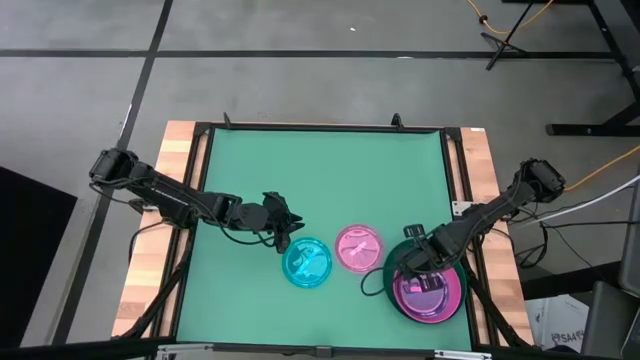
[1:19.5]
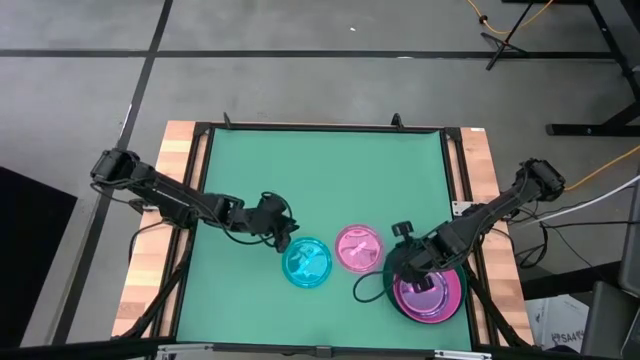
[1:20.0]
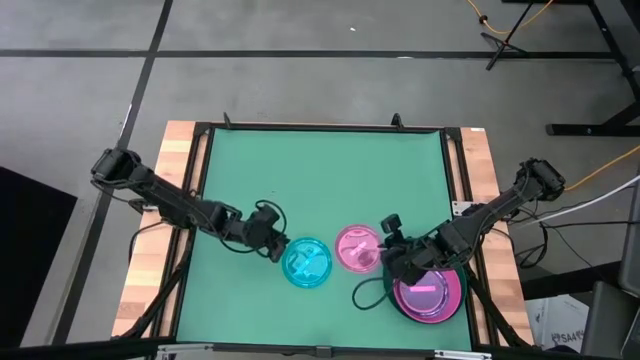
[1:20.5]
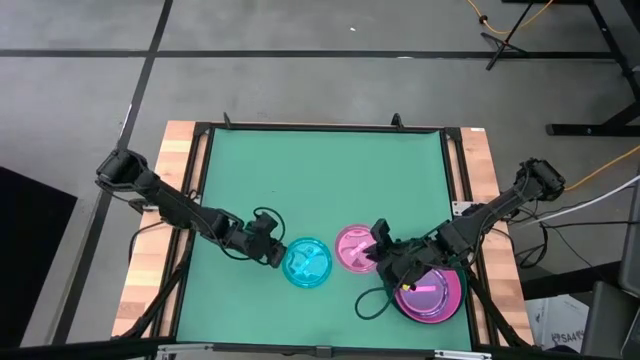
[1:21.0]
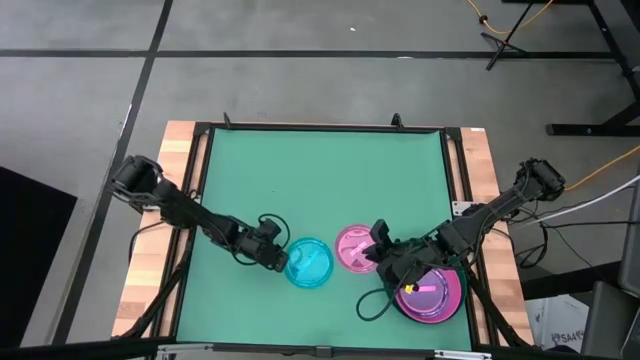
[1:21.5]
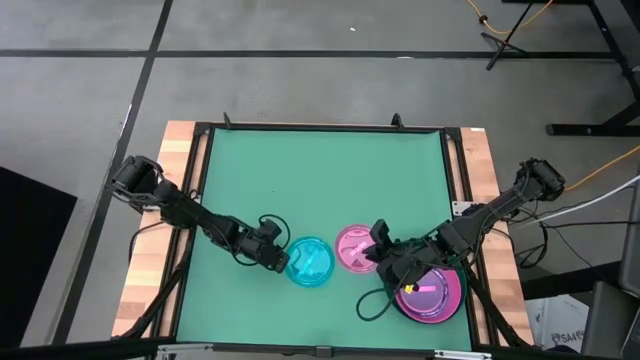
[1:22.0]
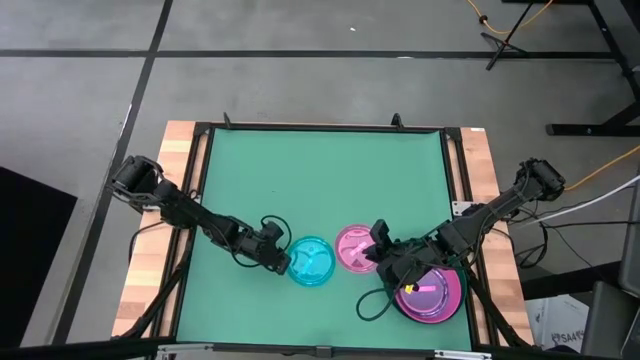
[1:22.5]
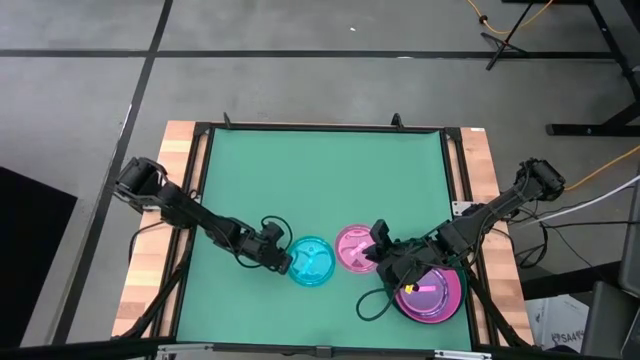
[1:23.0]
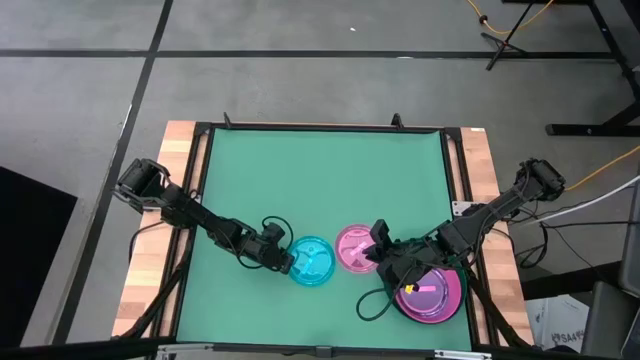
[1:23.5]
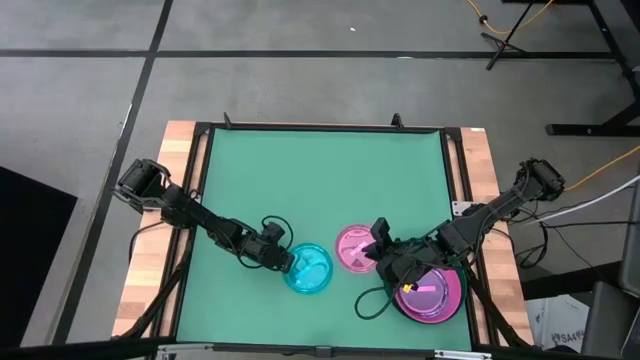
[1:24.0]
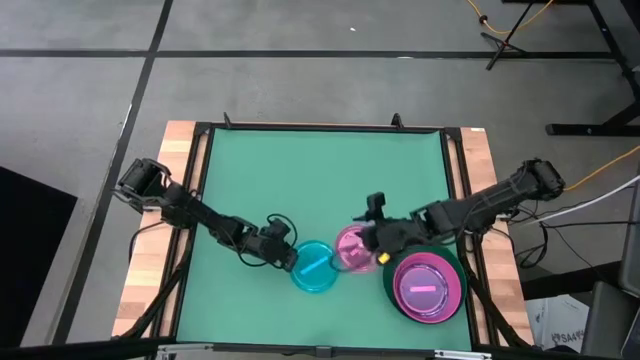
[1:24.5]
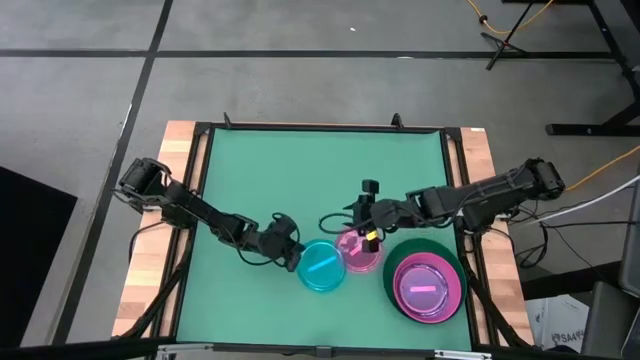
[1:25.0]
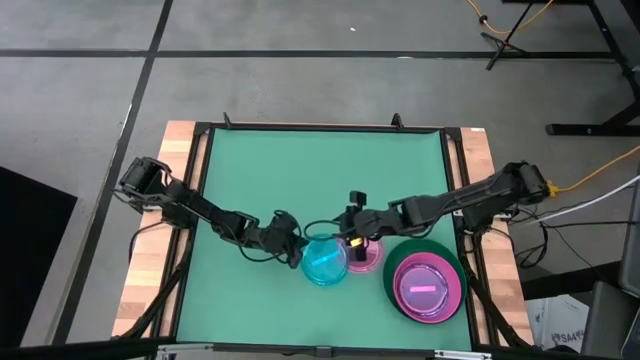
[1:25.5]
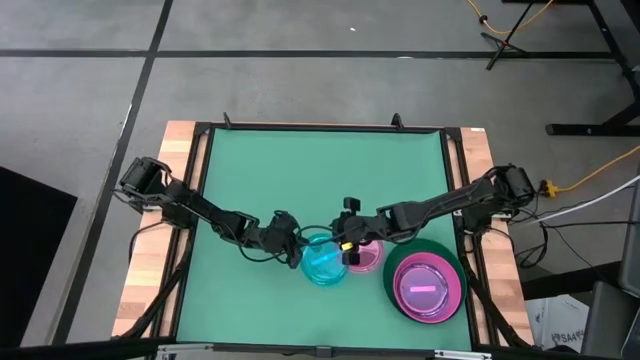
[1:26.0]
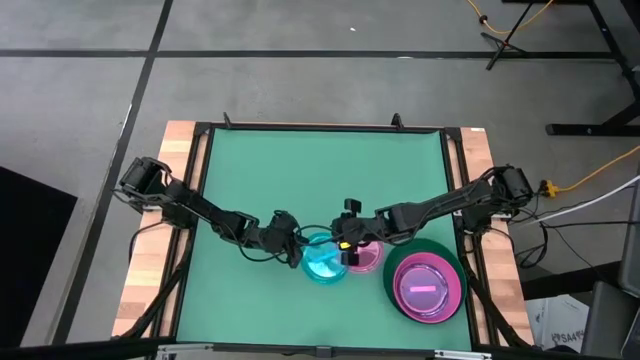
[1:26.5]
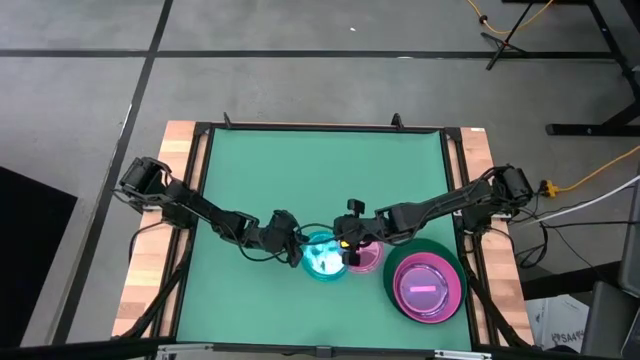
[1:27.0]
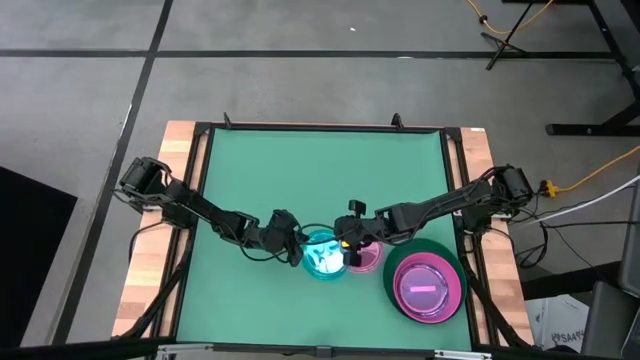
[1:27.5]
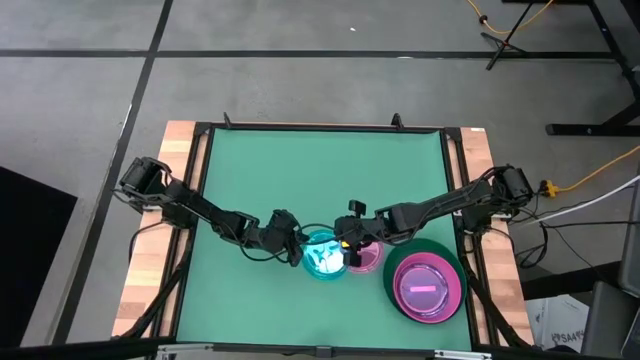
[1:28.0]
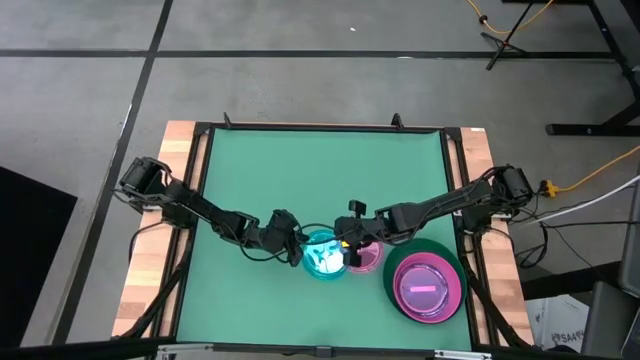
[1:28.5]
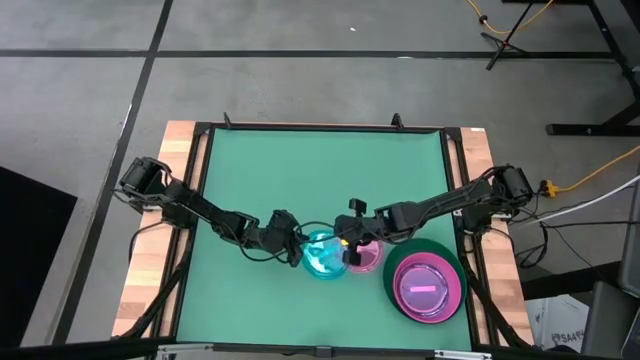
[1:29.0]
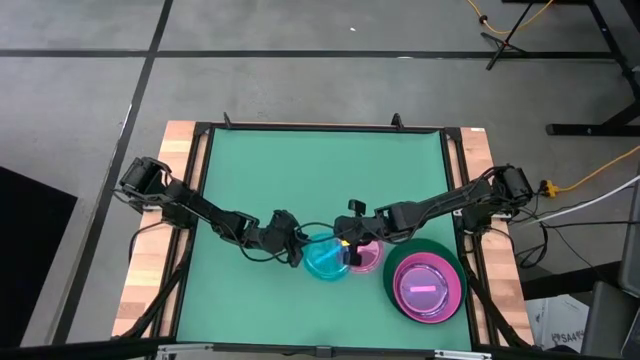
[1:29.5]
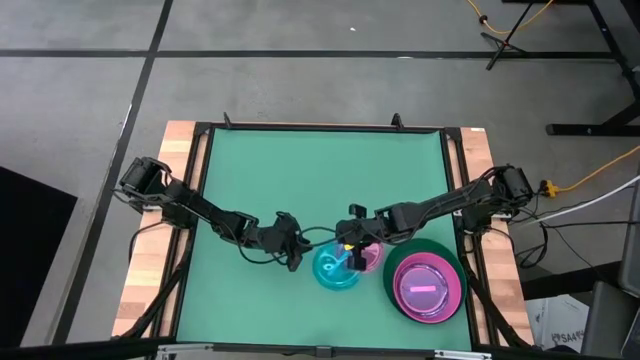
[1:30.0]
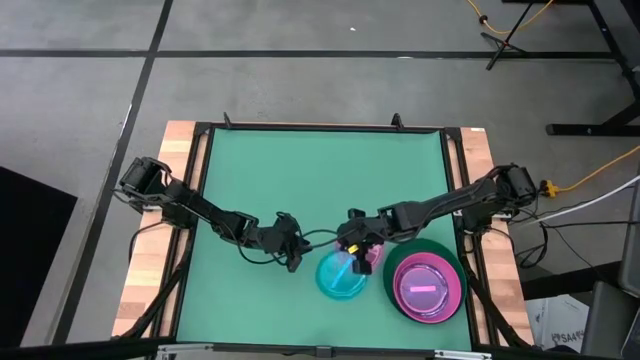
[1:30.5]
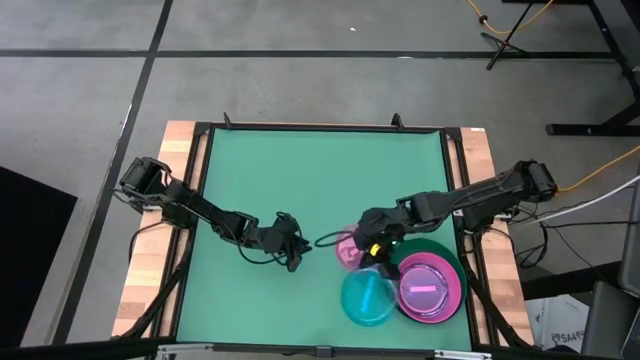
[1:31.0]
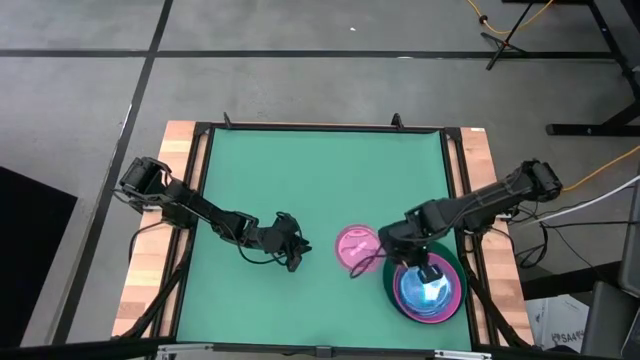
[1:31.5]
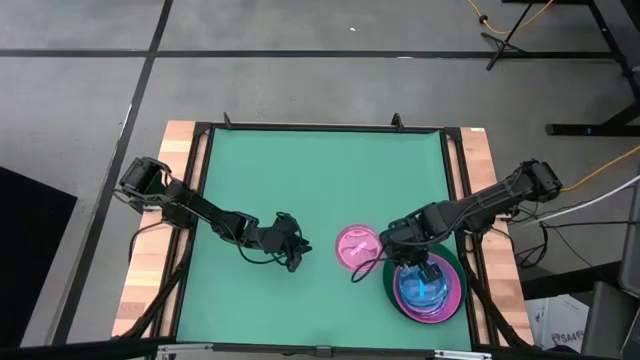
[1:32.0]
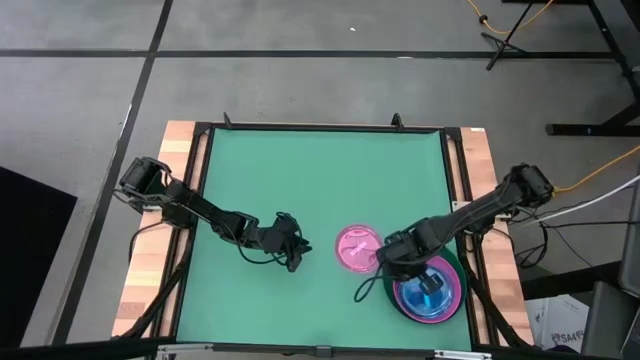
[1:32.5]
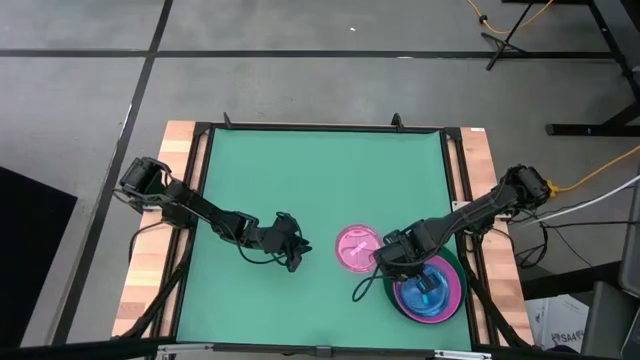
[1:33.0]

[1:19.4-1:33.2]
Task: Stack plastic plates
Stack the transparent blue plate on top of the transparent pink plate

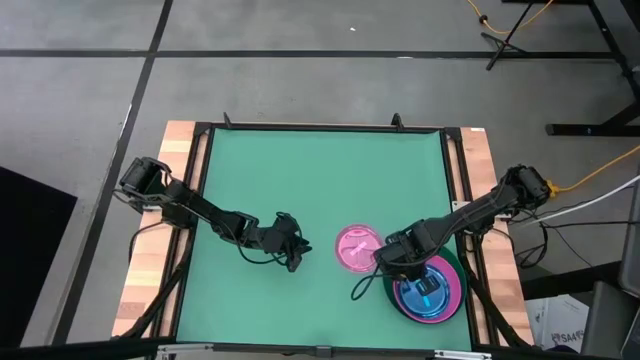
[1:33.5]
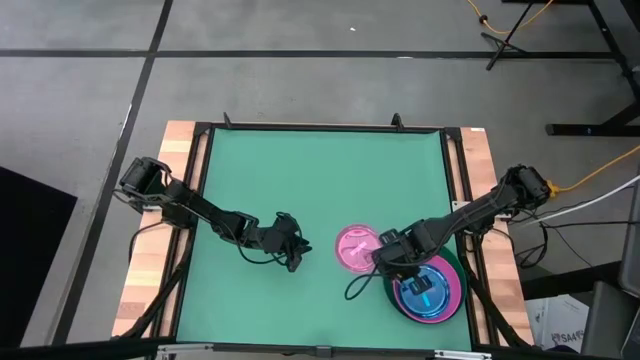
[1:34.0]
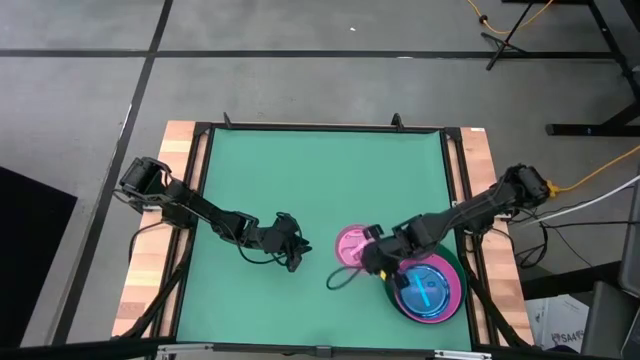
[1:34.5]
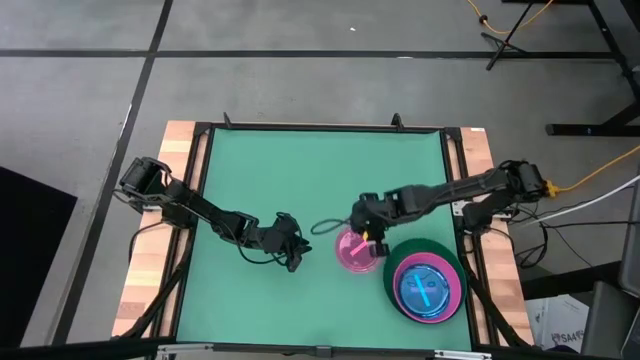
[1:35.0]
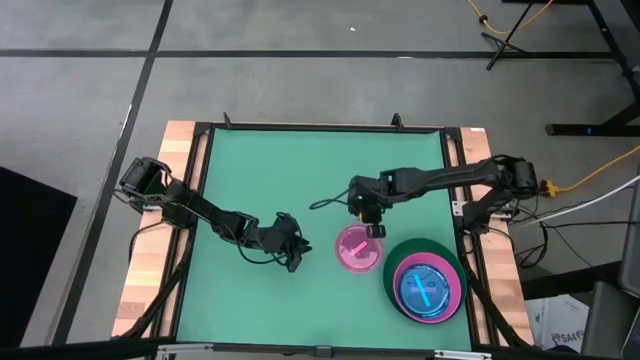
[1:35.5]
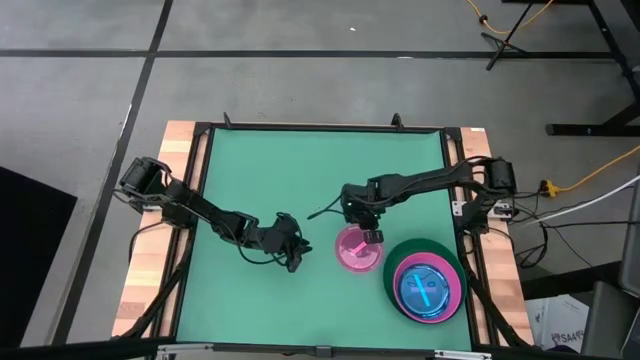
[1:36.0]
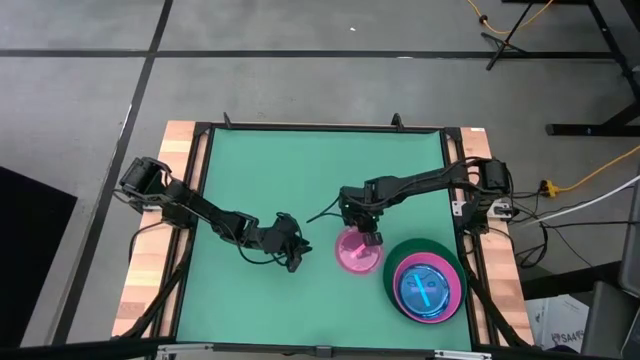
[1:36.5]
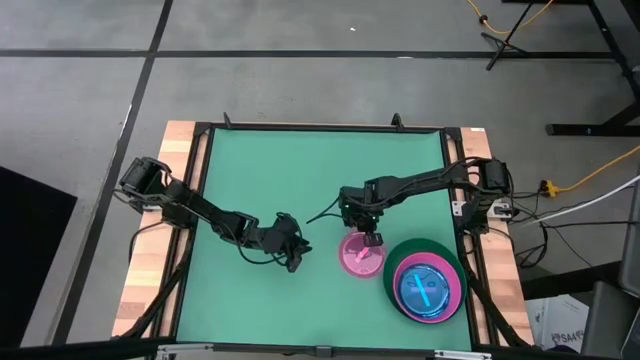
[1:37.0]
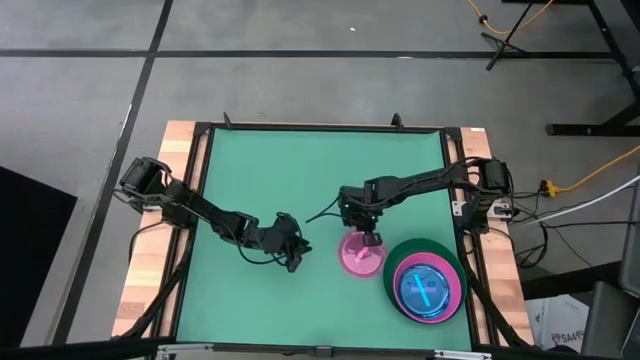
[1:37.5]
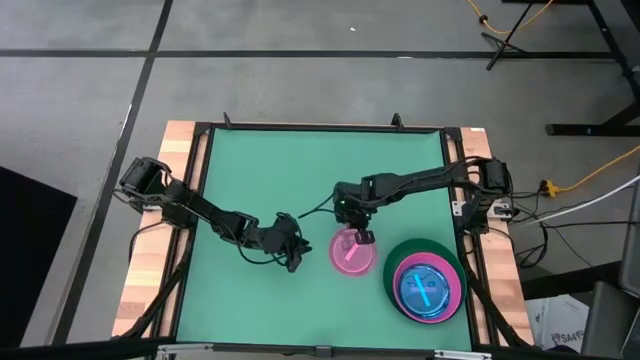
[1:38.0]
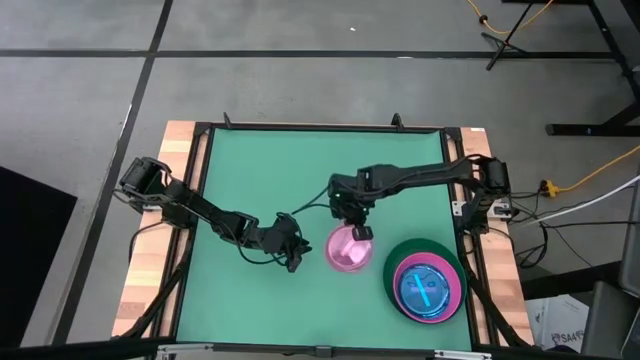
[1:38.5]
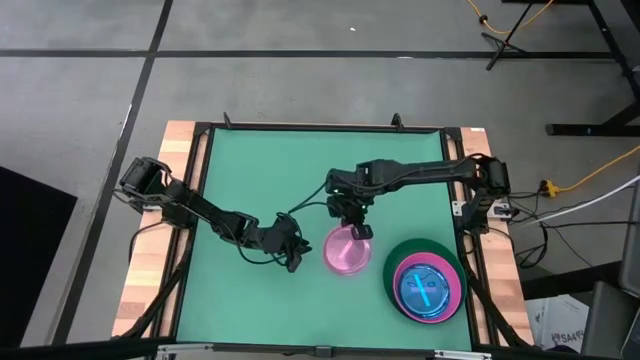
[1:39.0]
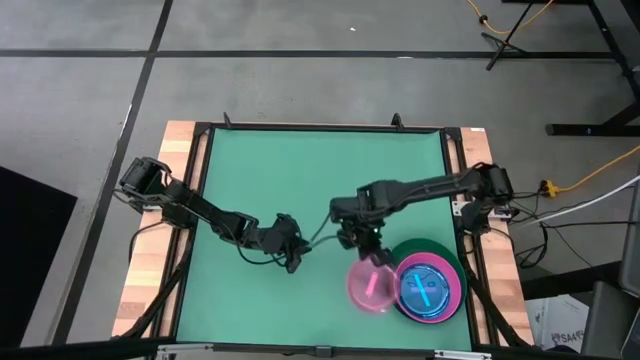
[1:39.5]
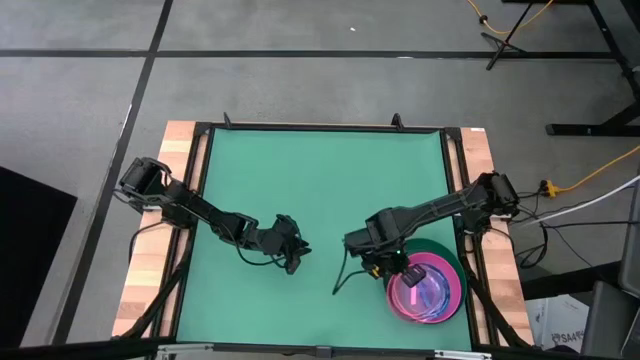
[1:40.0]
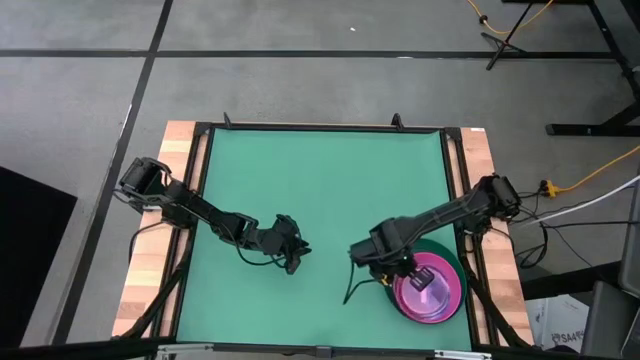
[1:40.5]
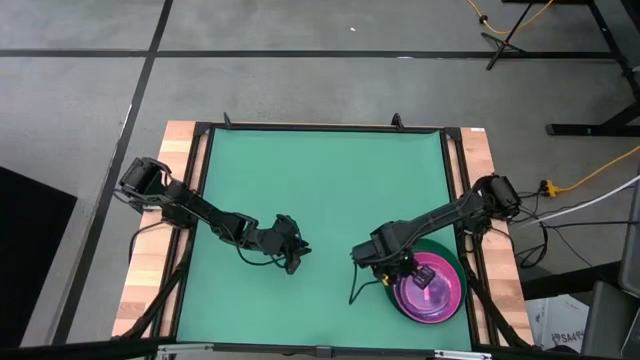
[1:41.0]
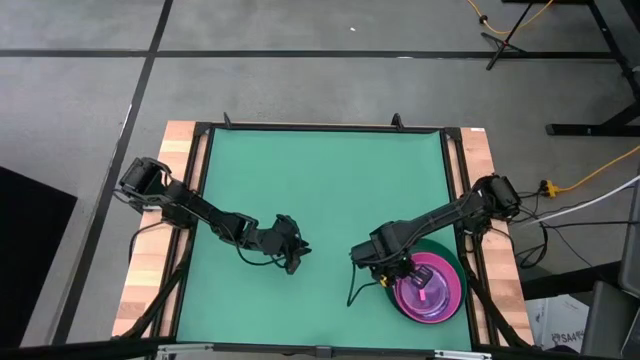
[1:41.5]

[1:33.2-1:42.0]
Stack the transparent pink plate on top of the transparent blue plate
